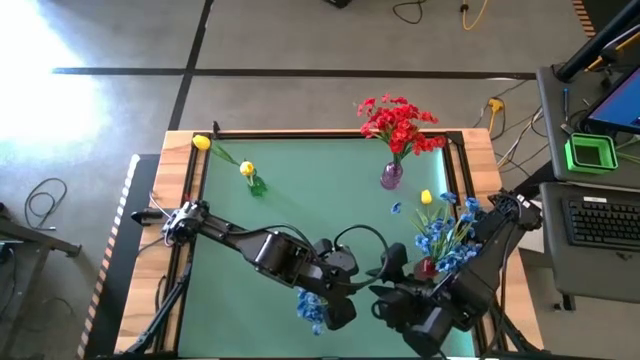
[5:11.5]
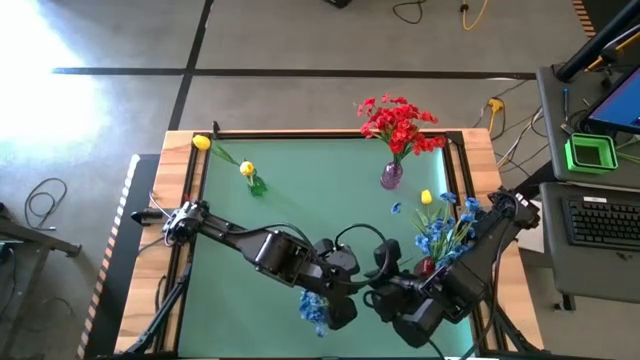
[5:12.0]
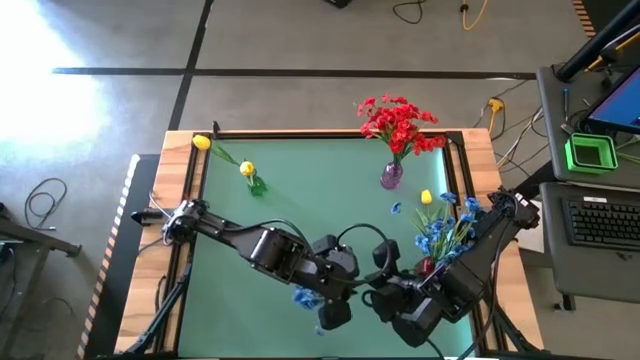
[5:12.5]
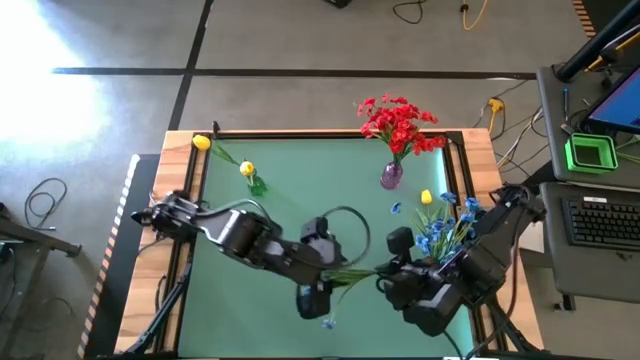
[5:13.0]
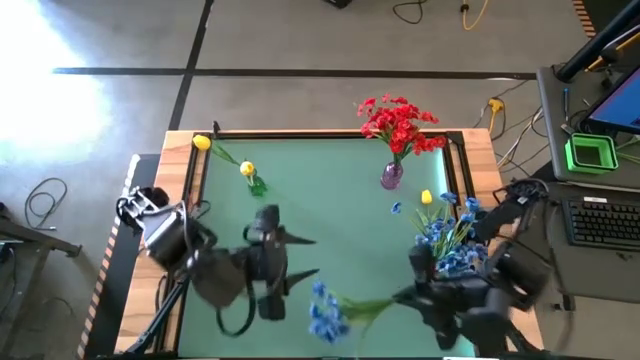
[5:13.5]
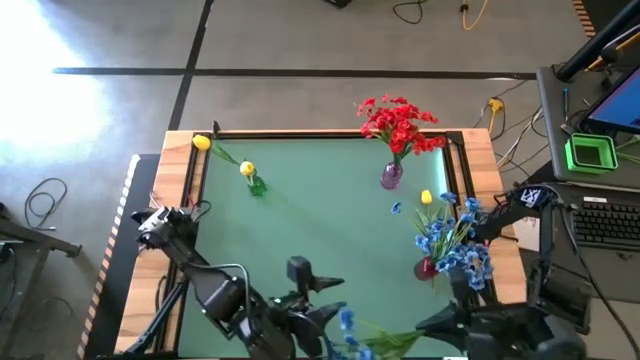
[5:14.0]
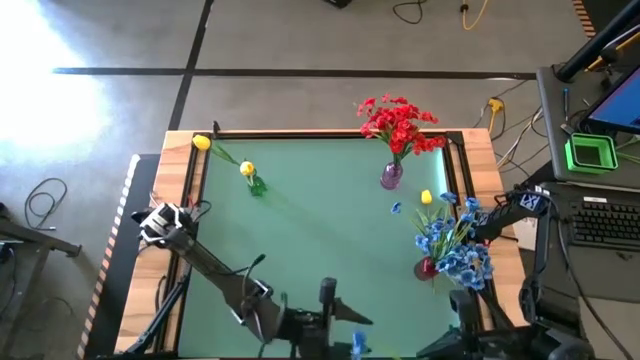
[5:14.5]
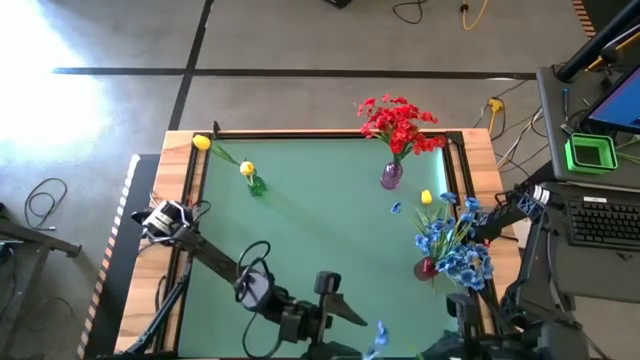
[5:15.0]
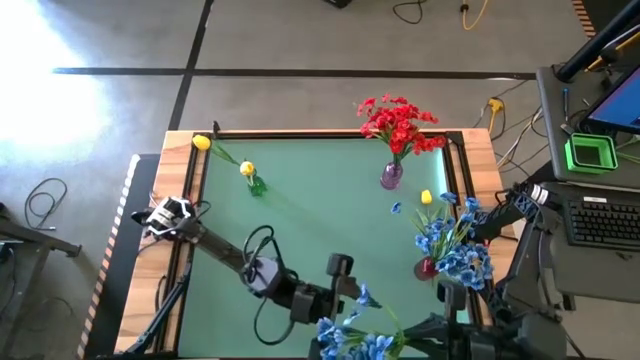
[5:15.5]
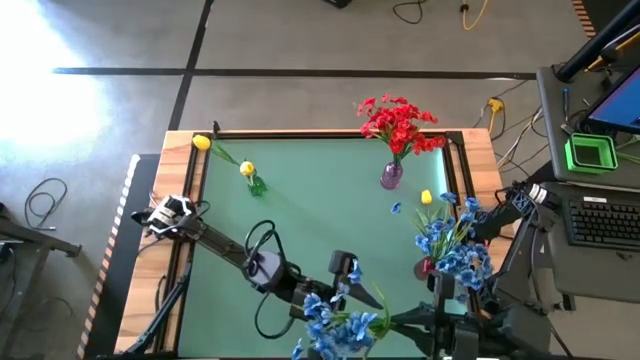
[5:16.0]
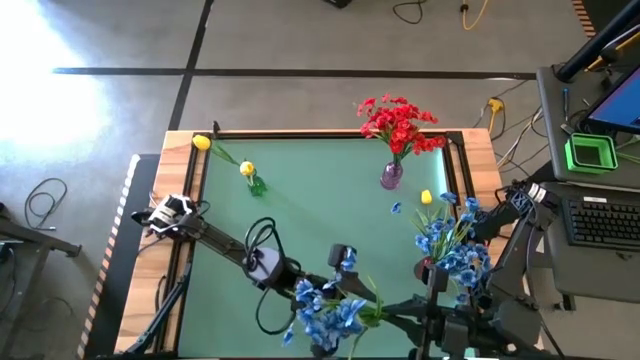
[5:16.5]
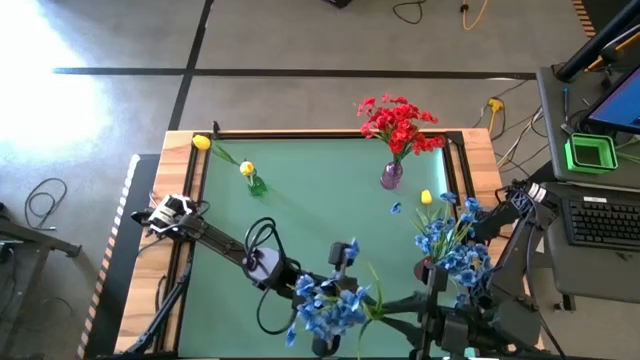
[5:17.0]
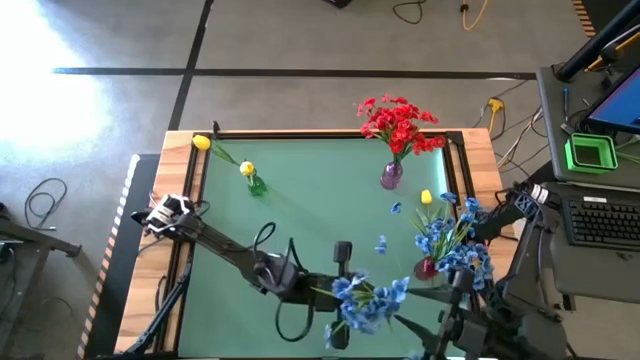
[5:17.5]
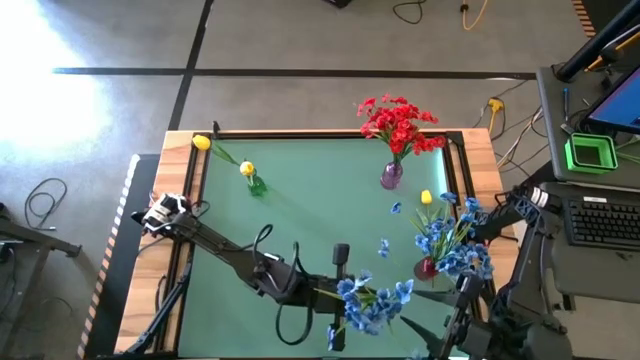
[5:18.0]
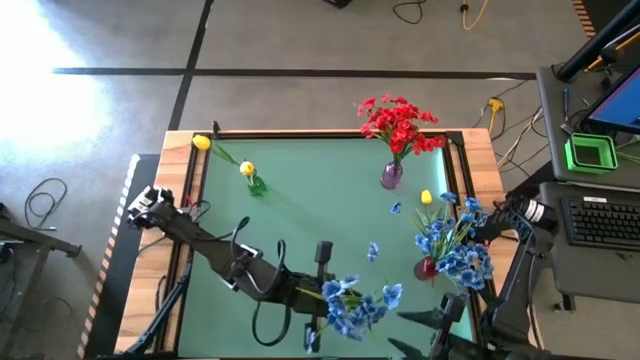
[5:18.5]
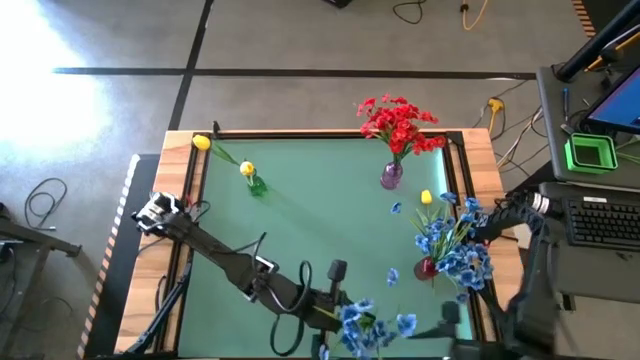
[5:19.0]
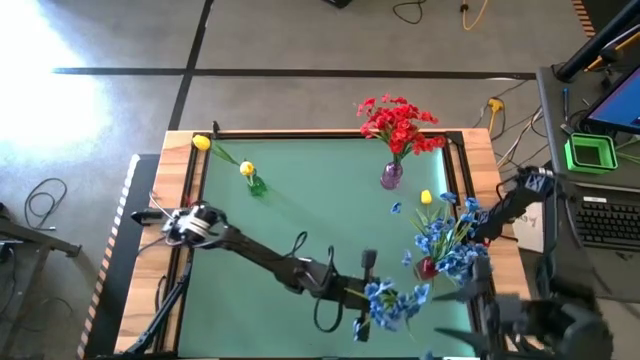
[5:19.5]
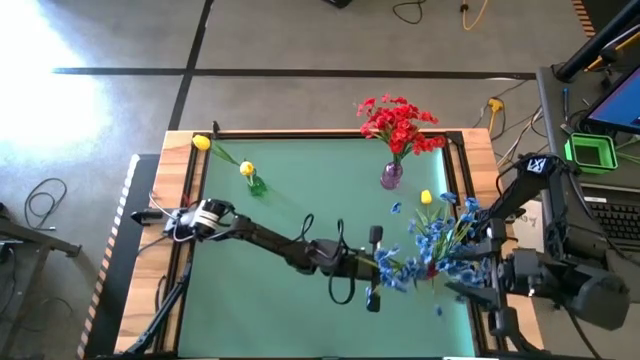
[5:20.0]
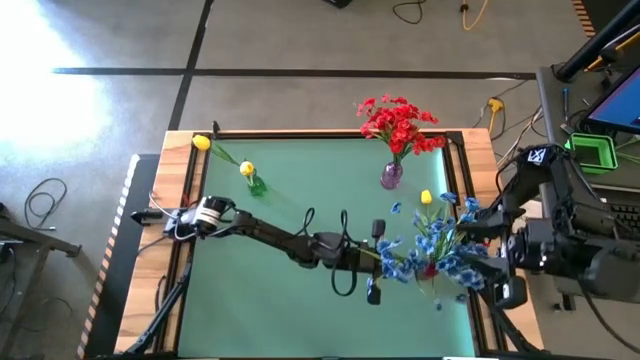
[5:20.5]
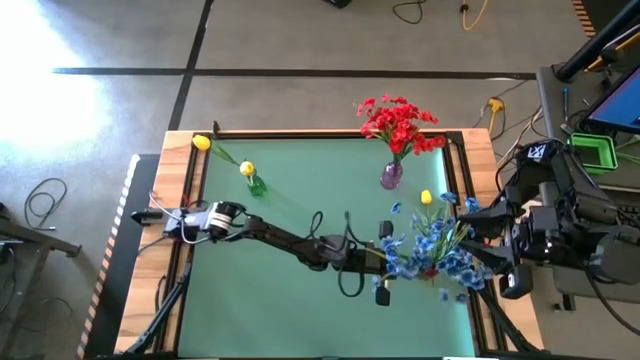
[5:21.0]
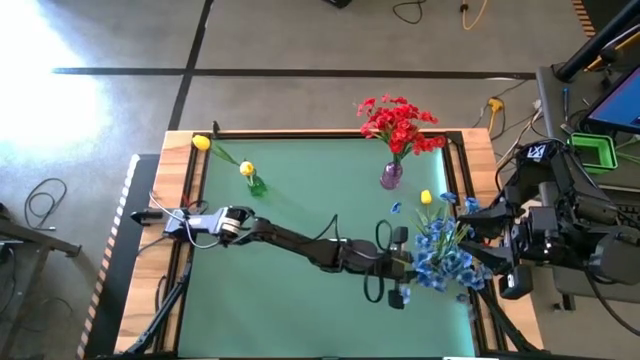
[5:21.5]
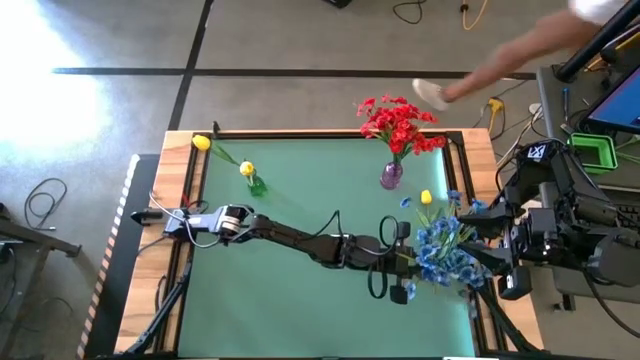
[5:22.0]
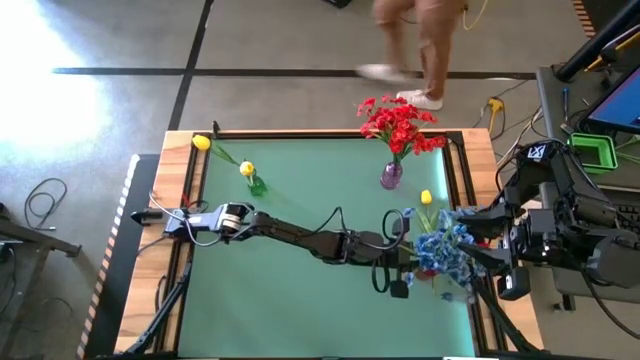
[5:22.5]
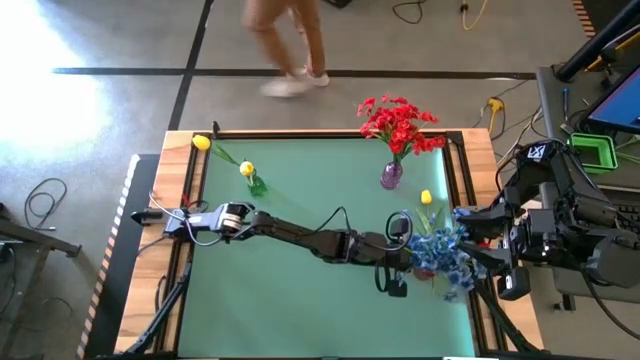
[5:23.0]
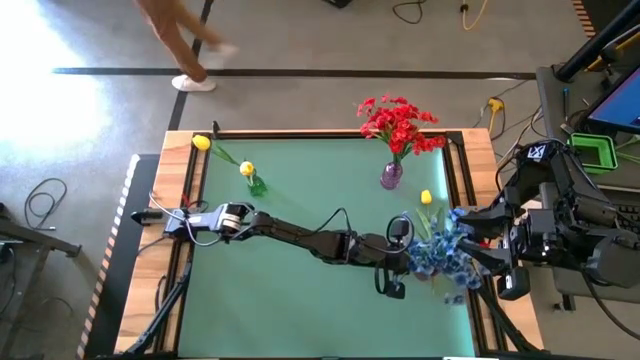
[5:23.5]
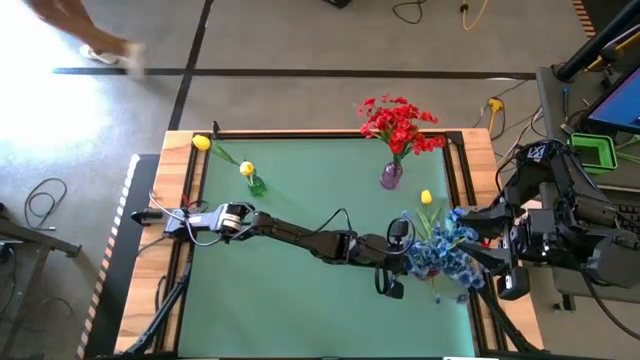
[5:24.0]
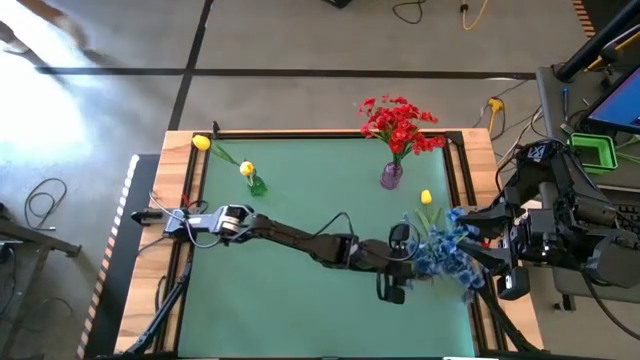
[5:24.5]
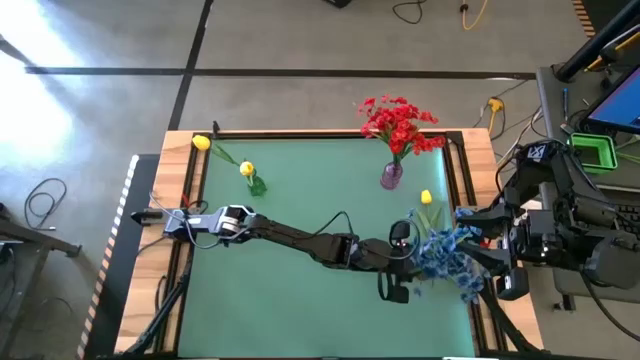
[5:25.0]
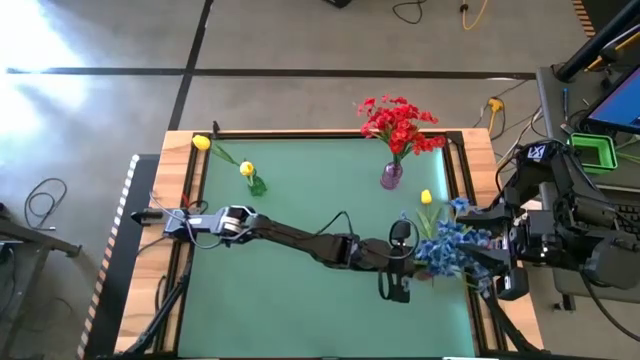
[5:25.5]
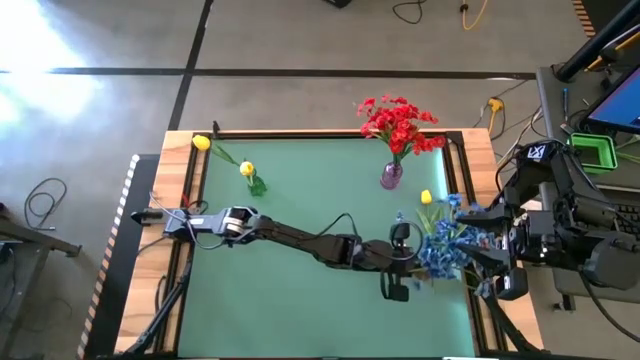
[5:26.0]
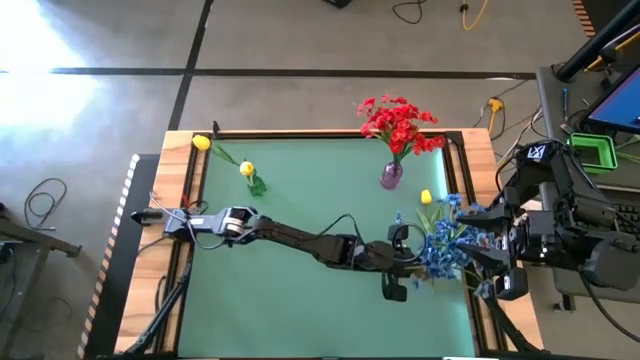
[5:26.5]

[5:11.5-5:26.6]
Task: Sort flowers into vase by color
Put the blue flower into the red vase

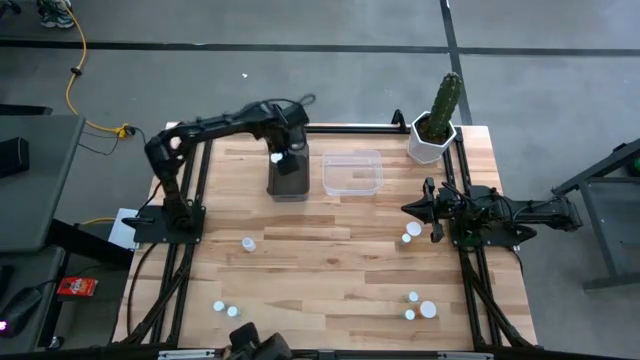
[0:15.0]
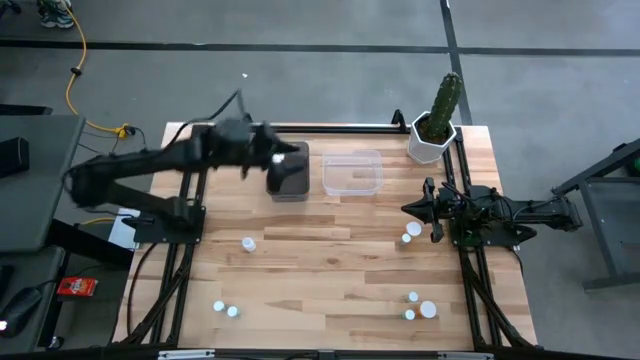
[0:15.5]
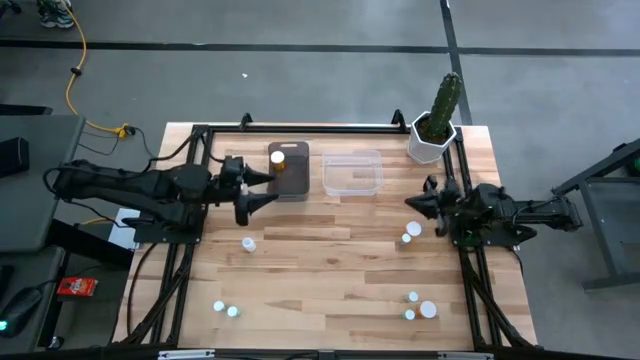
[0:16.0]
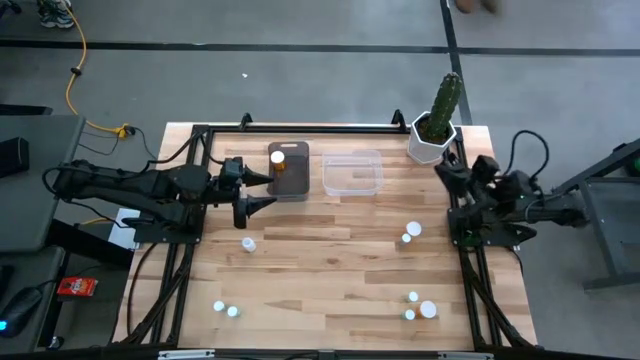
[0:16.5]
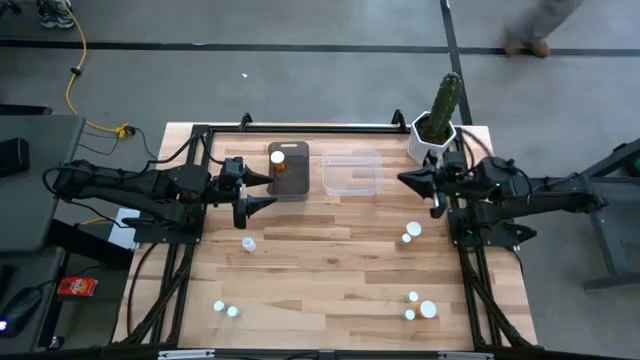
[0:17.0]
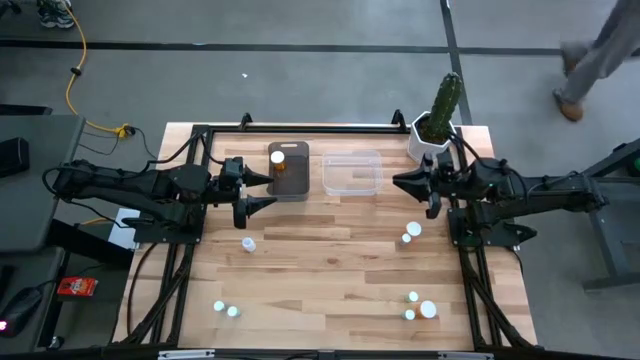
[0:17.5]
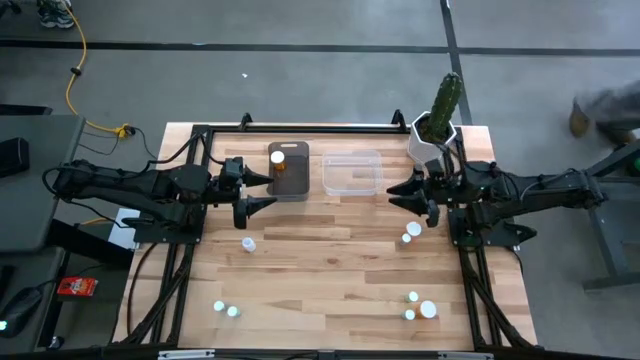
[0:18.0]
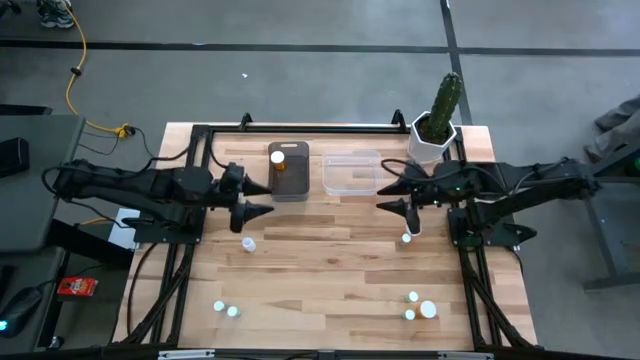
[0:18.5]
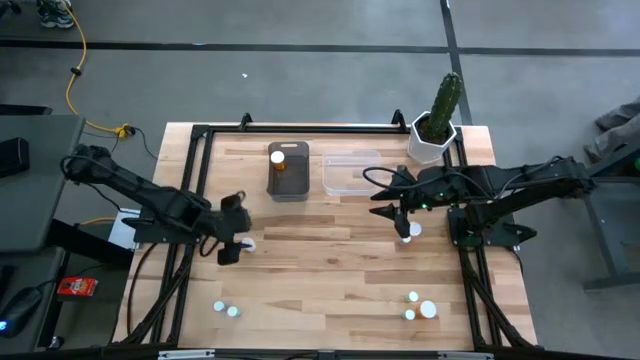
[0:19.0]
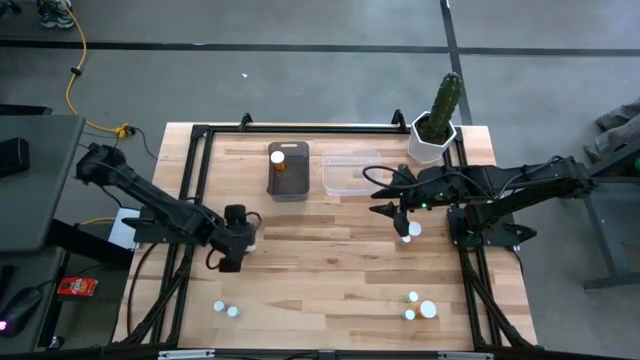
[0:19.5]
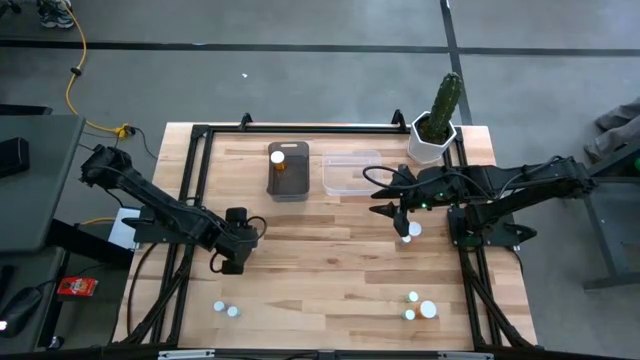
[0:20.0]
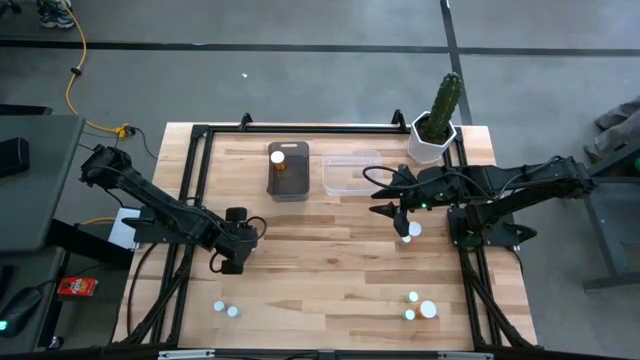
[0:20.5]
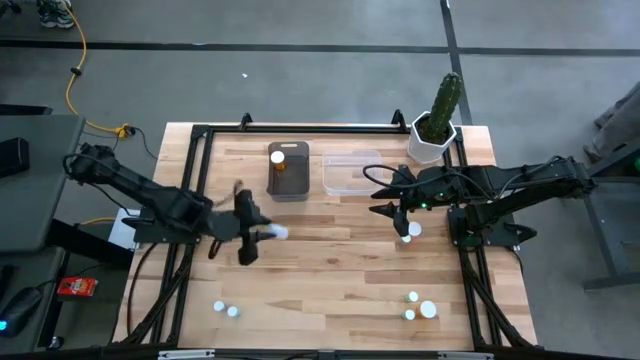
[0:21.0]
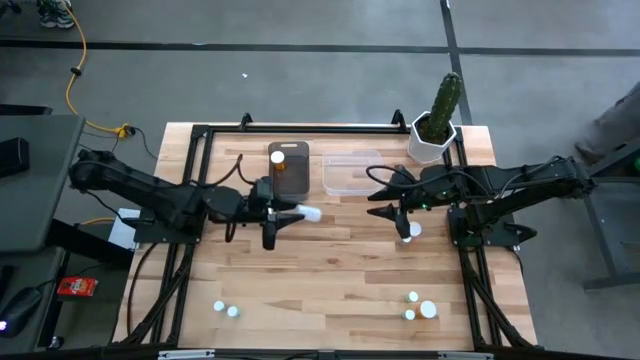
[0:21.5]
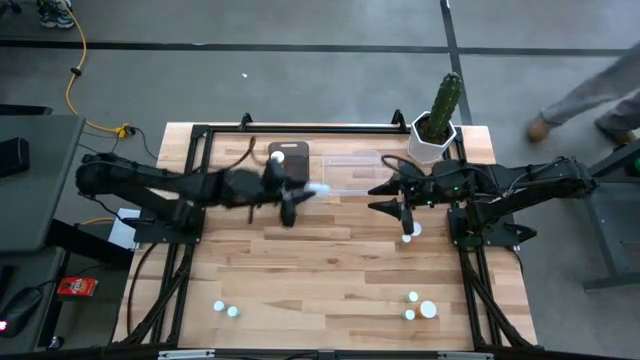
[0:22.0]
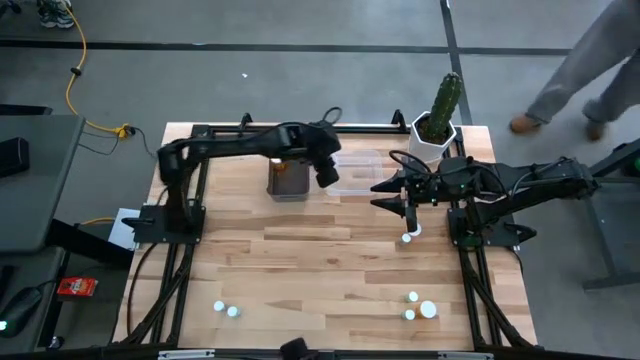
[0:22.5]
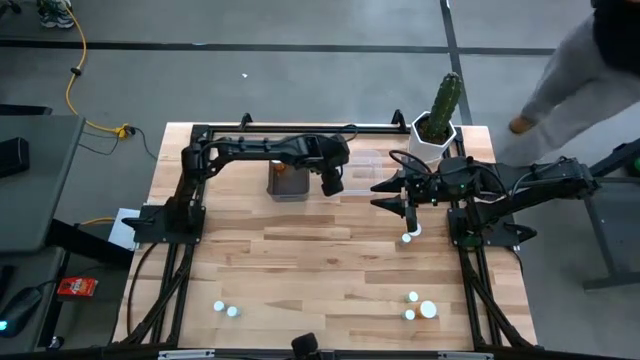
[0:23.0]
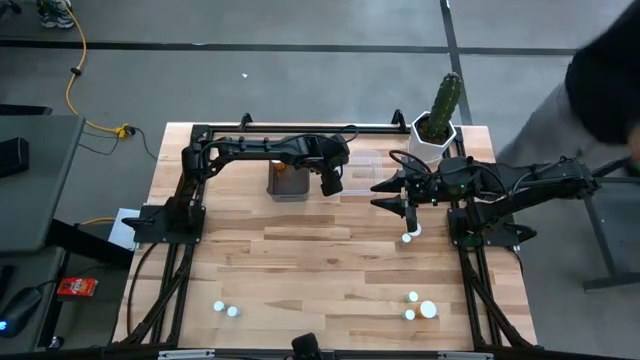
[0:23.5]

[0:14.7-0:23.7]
Task: Pick and place medicine bottles into bin by pill shape (circle, oval)
Put the white tablet bottle into the transparent bin
